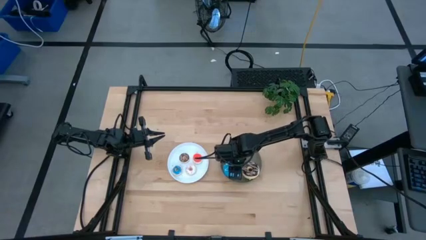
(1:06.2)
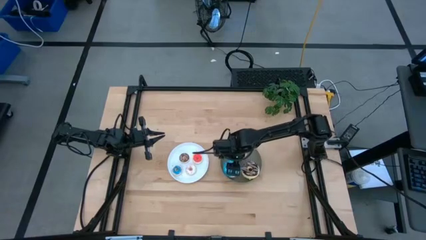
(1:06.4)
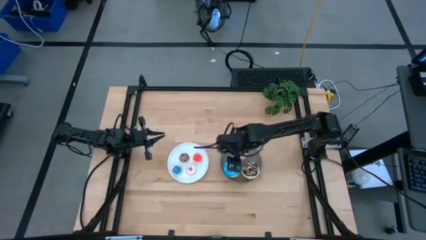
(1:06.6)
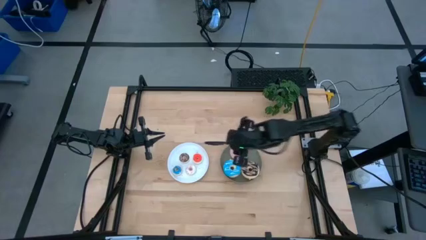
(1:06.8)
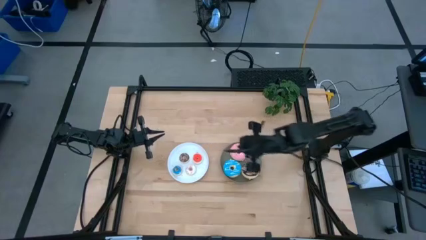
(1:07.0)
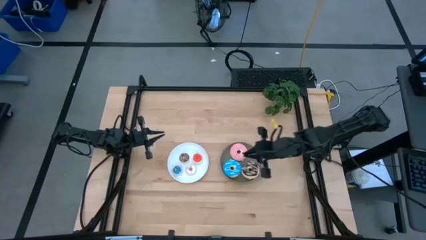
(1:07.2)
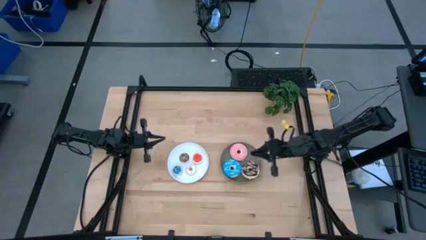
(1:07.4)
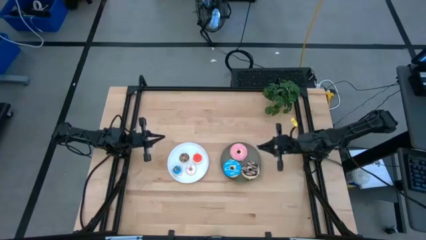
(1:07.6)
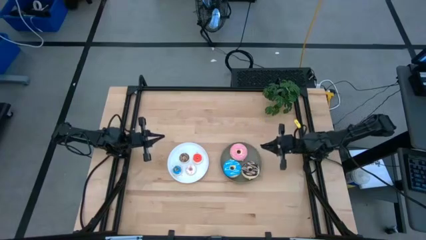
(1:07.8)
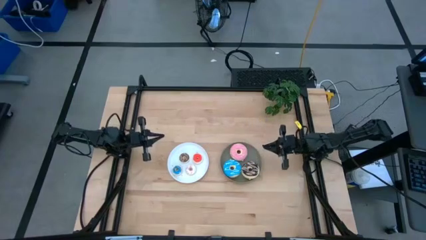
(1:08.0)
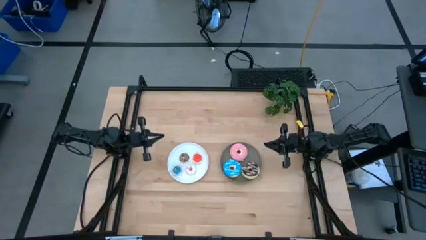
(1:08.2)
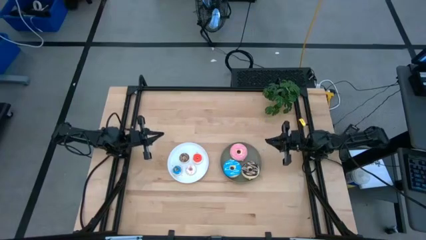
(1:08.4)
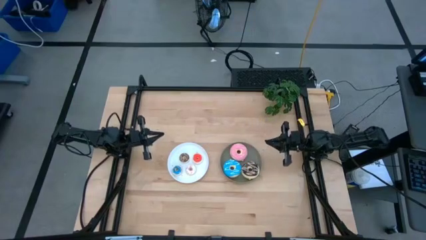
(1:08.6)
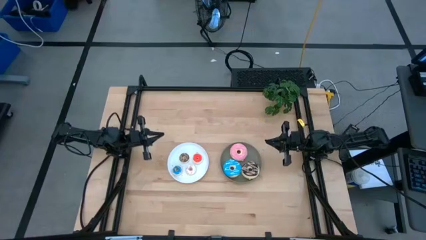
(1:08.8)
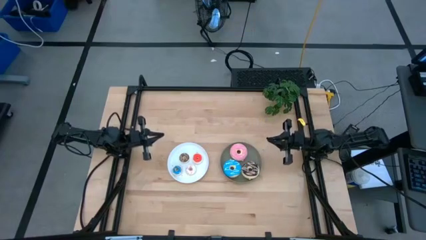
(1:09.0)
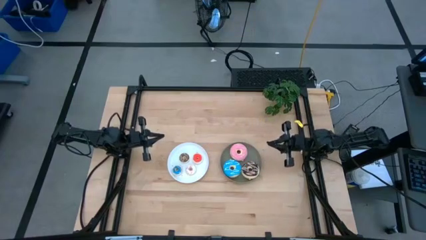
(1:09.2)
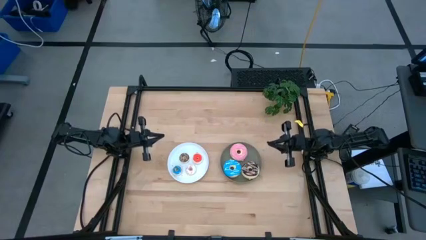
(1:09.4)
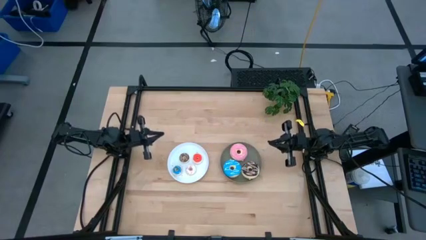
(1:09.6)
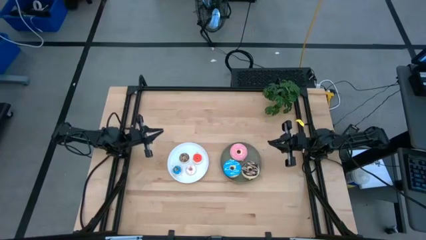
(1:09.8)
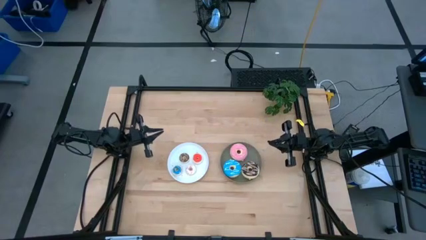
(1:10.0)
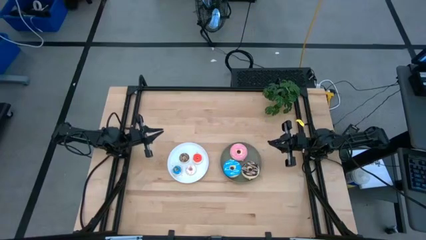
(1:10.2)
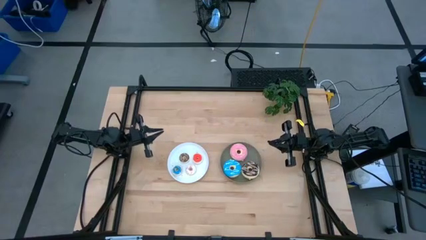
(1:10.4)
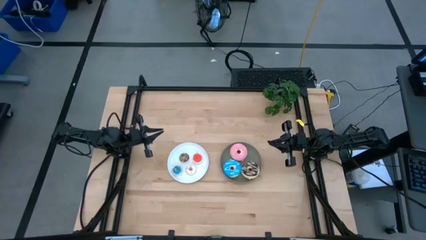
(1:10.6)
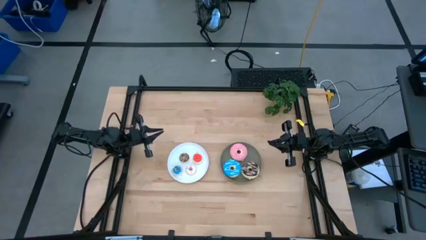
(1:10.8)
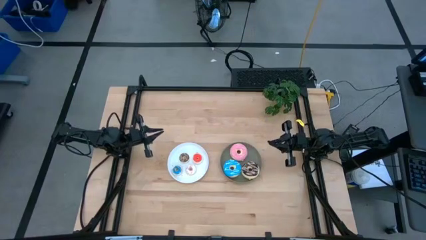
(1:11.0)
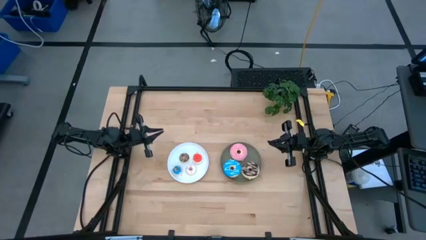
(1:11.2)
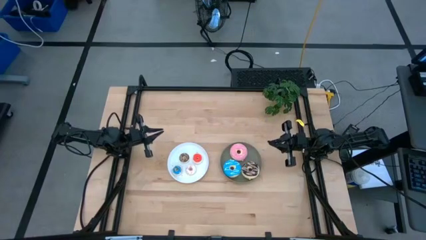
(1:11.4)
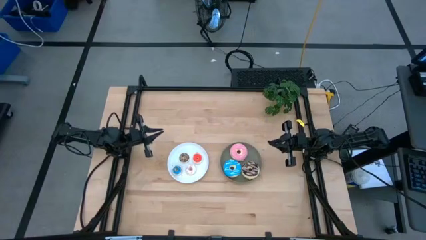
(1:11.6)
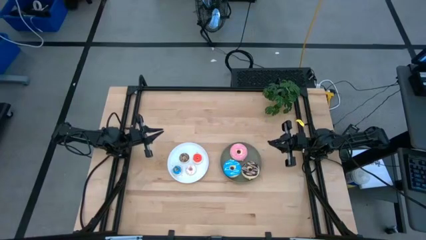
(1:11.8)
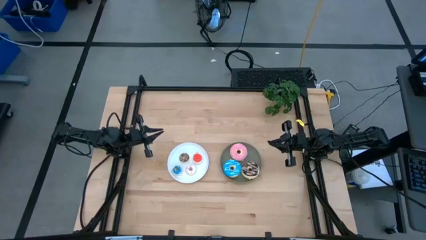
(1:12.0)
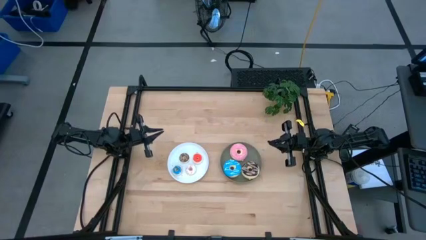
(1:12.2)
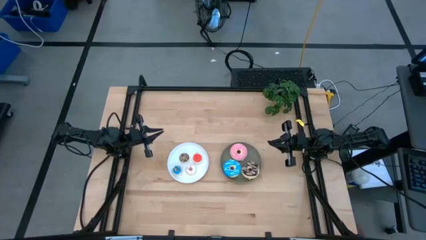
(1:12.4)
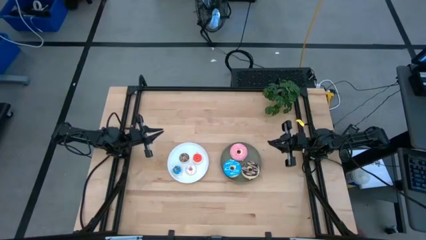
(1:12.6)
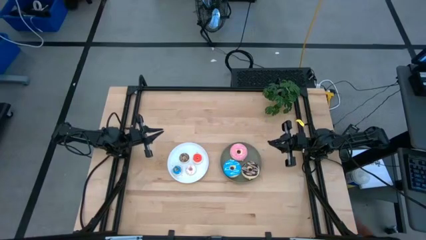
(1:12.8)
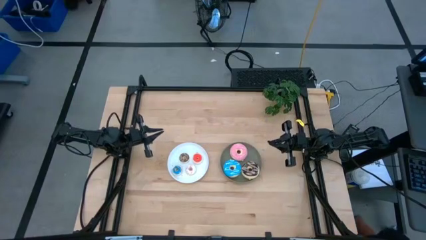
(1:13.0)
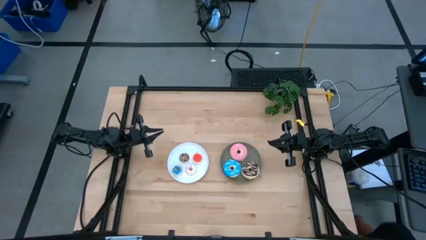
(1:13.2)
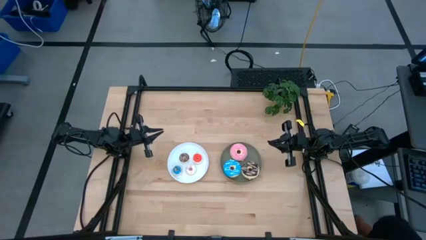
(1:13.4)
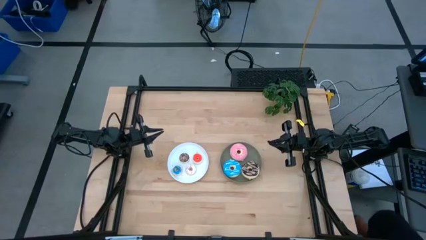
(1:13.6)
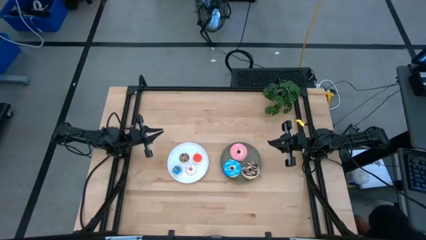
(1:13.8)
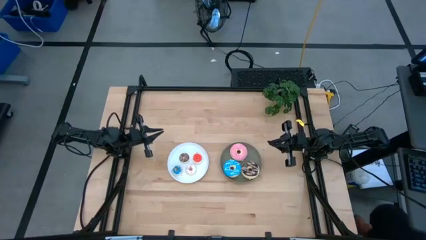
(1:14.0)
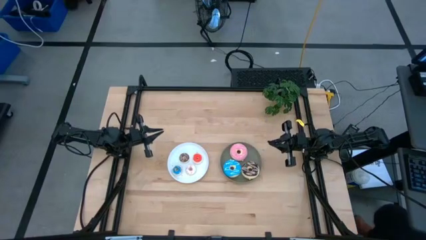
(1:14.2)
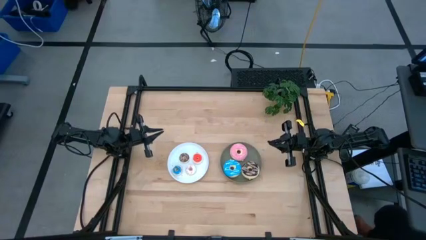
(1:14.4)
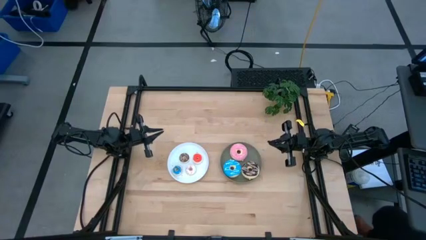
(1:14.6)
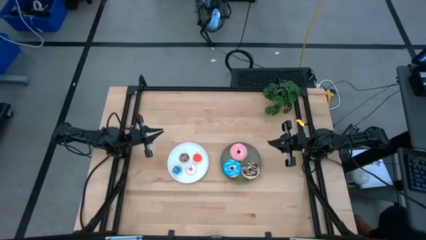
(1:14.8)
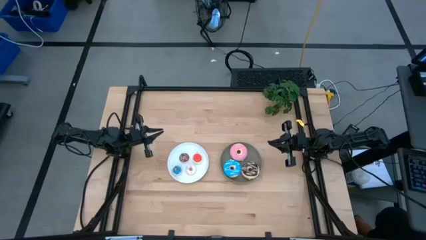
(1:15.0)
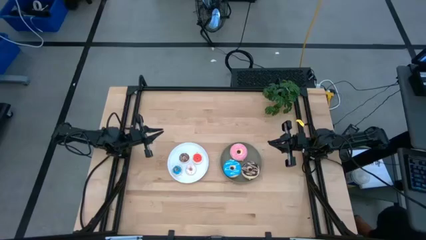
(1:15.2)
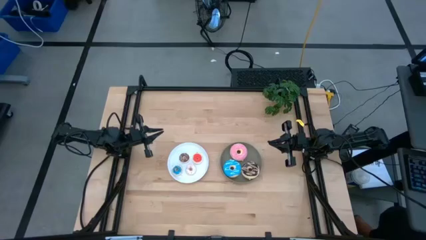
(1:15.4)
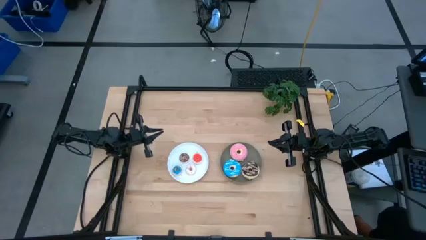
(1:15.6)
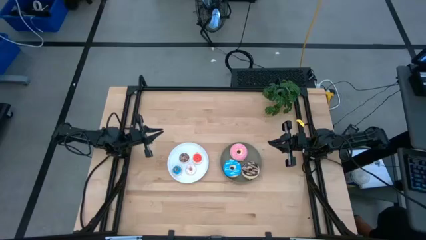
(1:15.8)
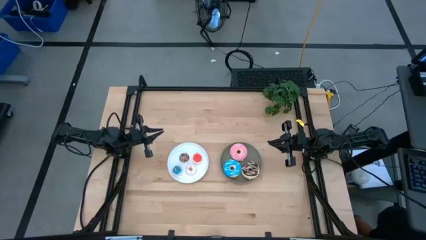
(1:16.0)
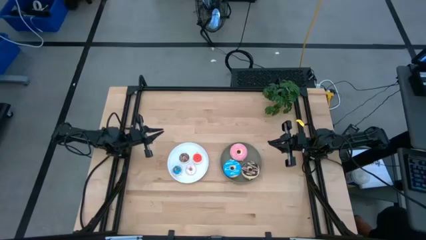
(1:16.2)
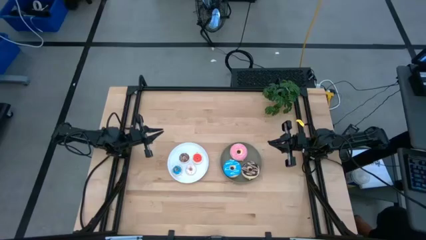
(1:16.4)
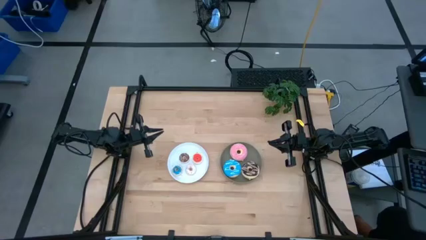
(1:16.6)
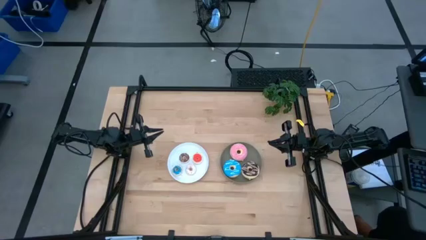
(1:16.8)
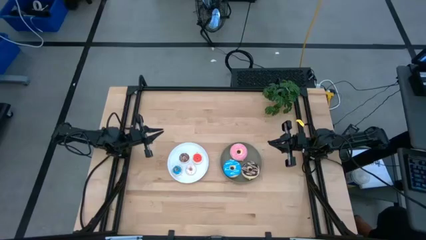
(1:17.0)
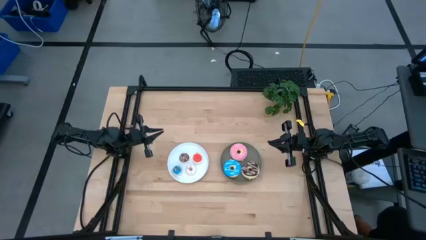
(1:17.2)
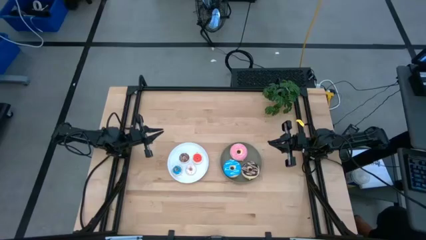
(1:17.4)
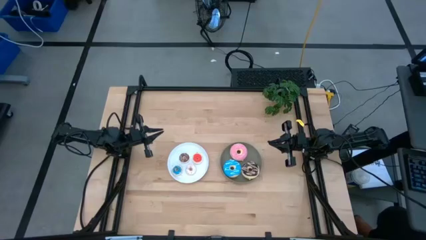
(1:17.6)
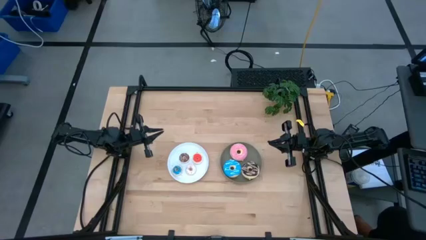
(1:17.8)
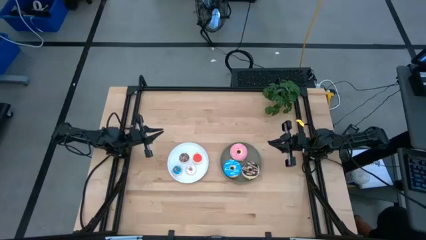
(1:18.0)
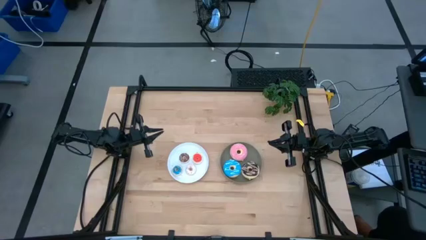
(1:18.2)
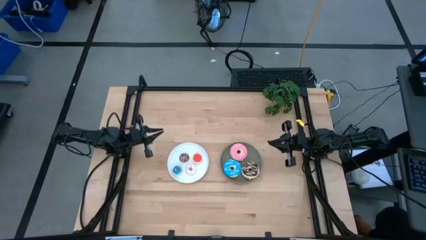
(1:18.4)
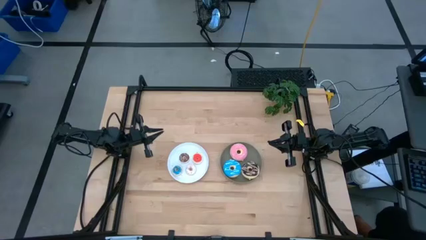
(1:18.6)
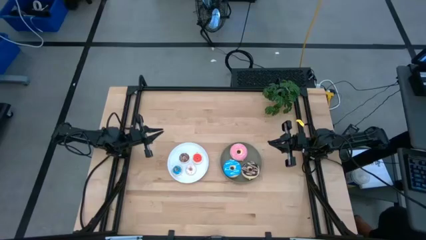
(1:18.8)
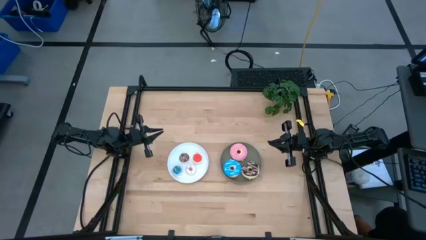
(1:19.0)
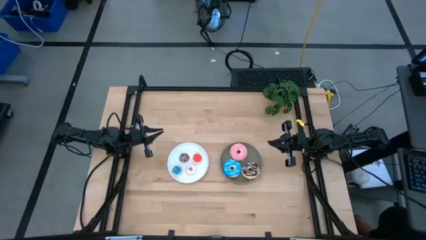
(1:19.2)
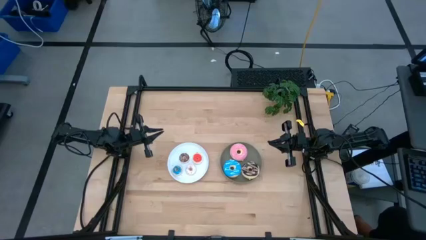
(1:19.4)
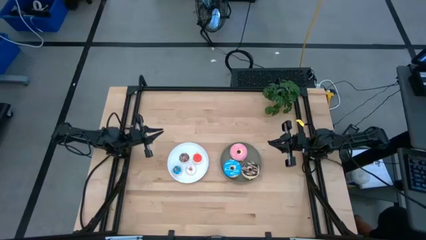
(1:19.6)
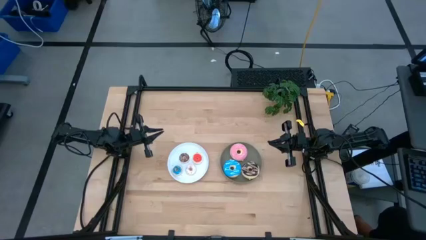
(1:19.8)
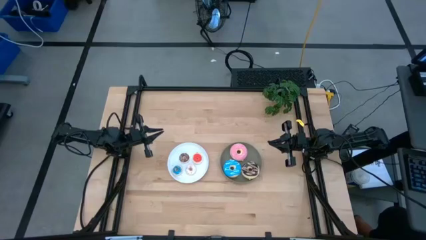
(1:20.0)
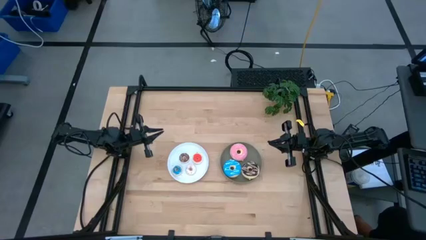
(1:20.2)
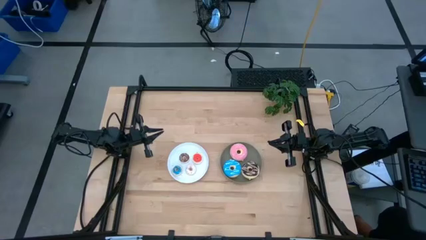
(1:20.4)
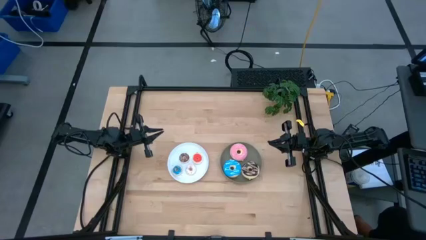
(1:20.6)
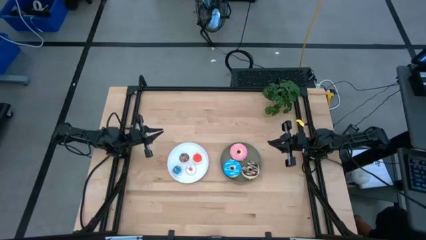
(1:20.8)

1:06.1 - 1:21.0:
Task: Pick & Place donuts
Return to Home Position
